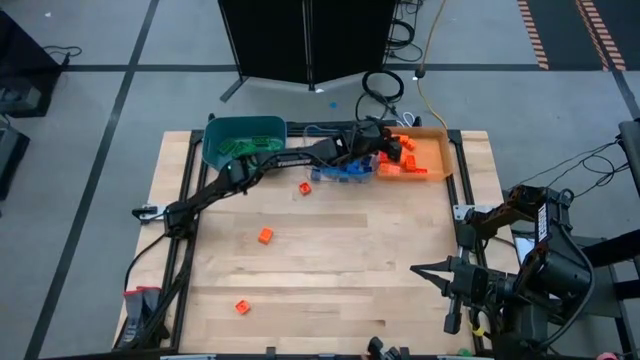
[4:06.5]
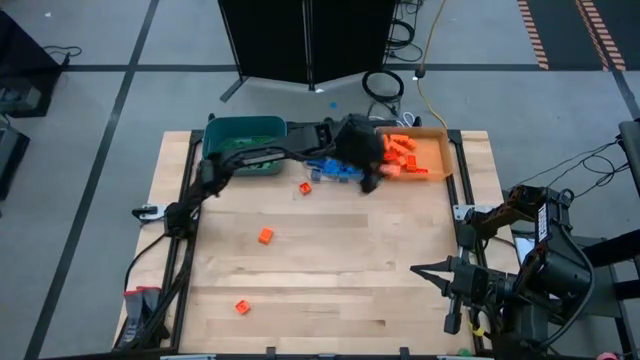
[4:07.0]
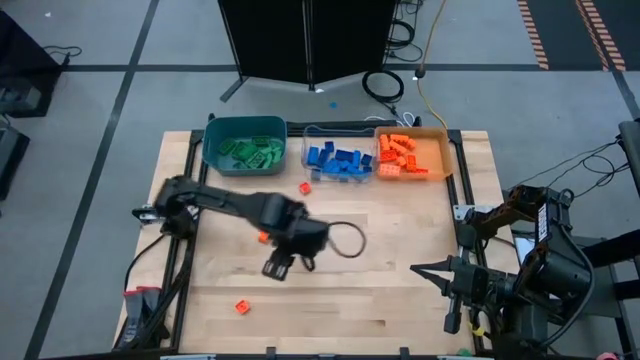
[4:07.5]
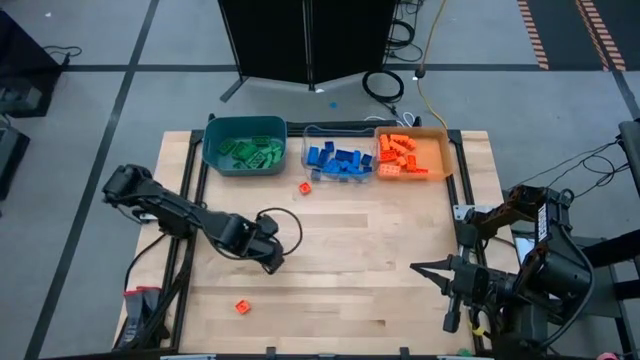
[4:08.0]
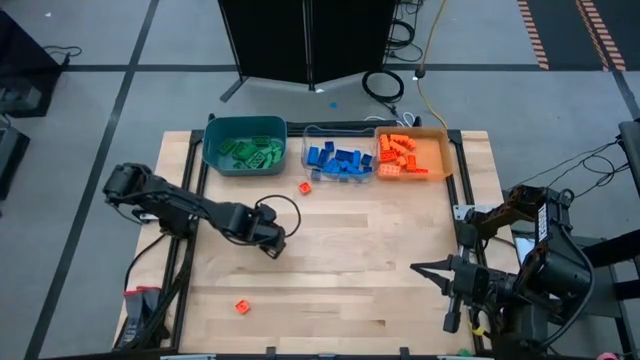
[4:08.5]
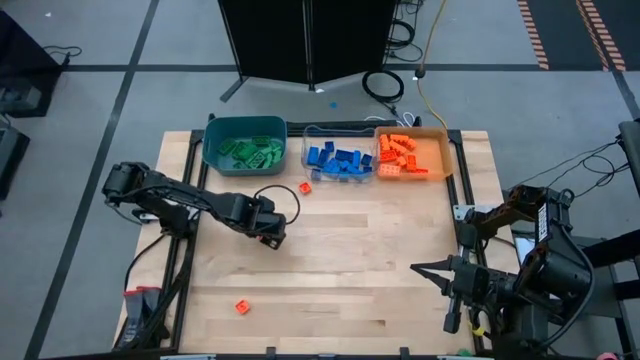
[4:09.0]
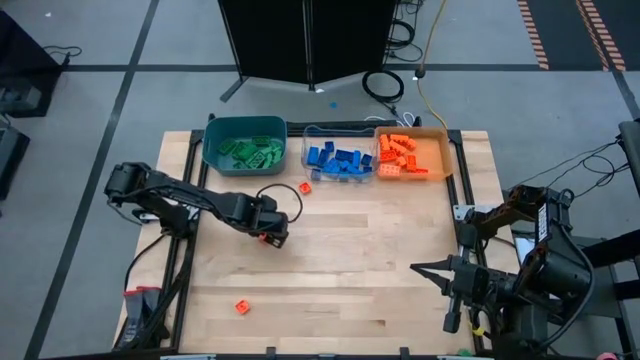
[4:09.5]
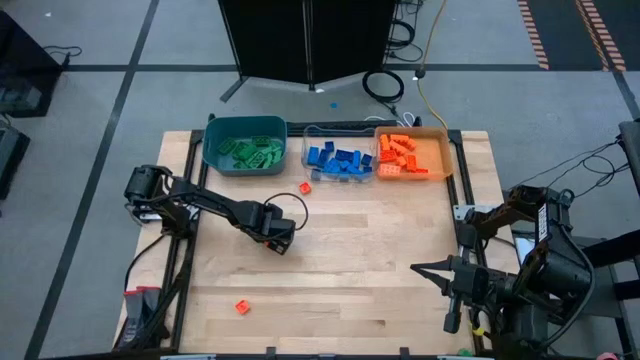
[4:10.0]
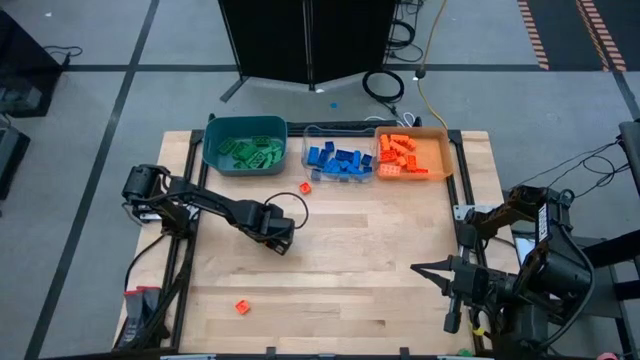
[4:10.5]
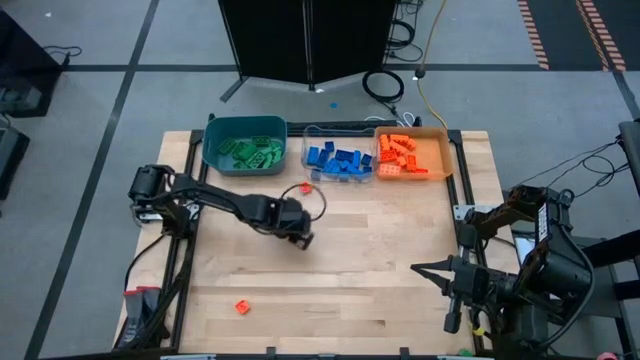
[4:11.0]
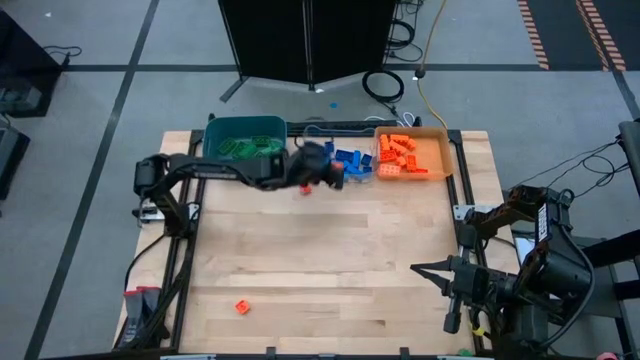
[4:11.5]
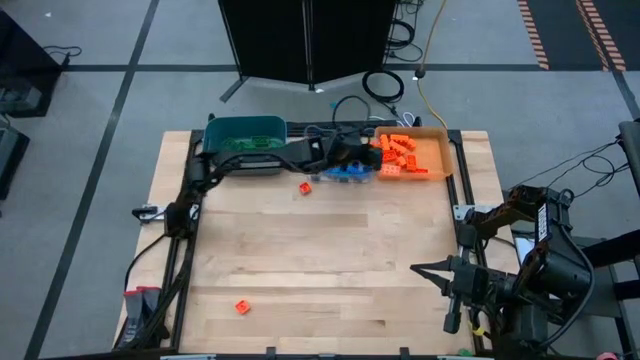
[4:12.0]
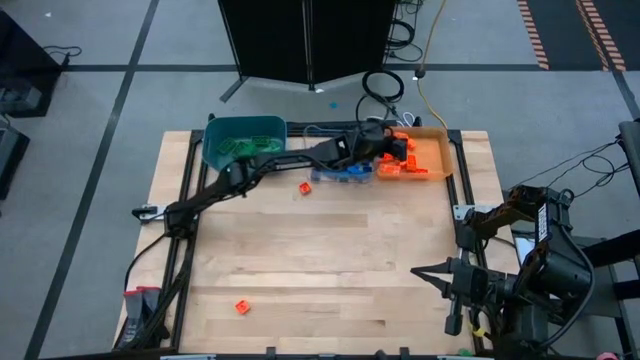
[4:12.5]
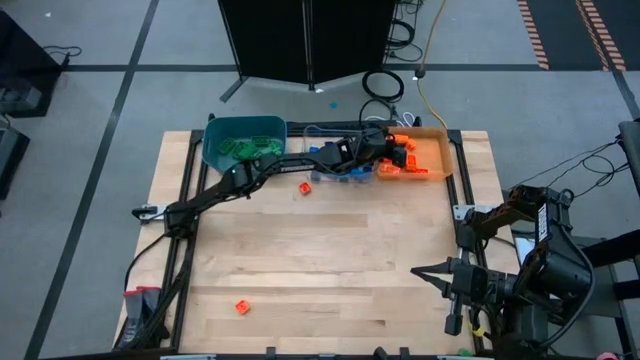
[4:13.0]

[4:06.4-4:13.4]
Task: Sort blocks
Put the orange game piece into the orange transparent bin

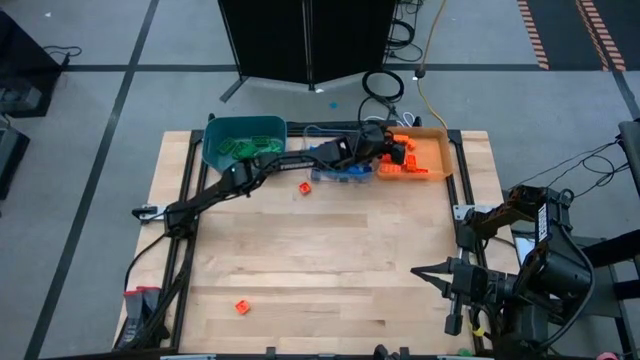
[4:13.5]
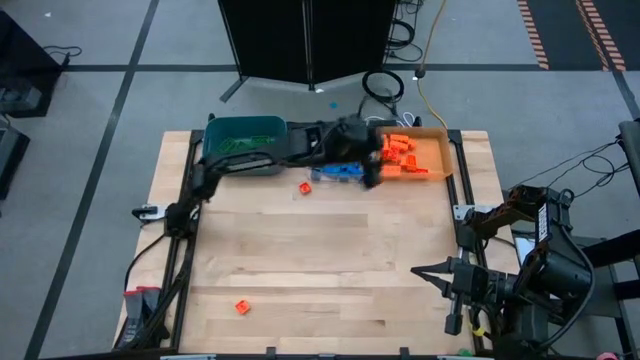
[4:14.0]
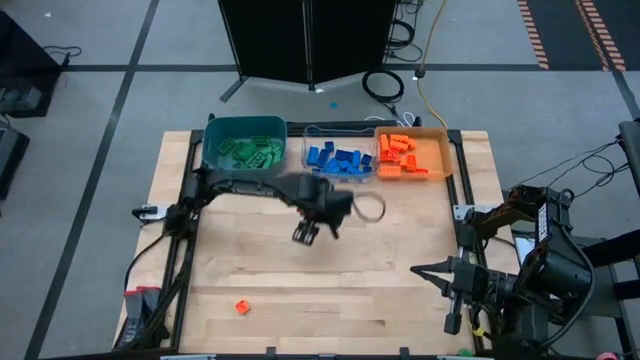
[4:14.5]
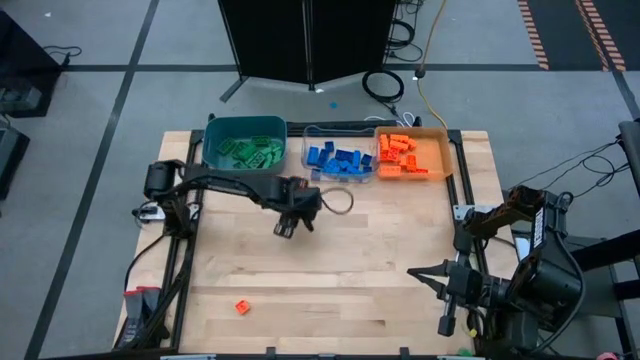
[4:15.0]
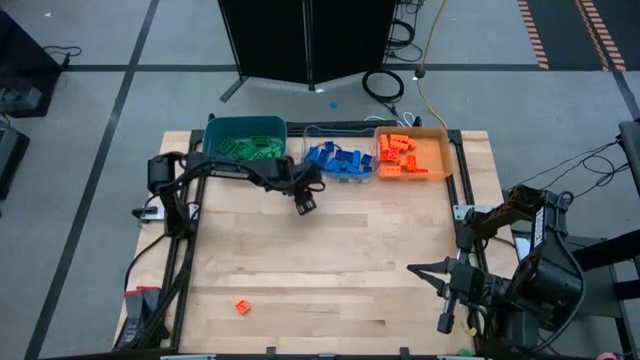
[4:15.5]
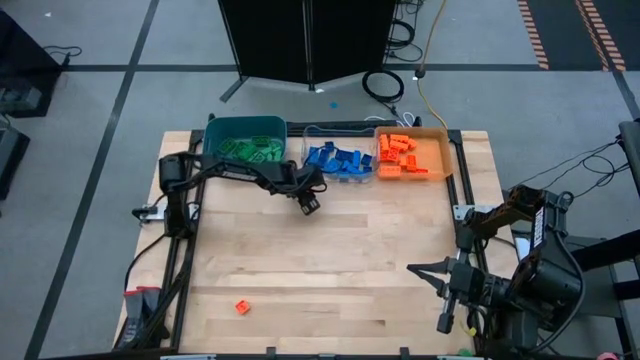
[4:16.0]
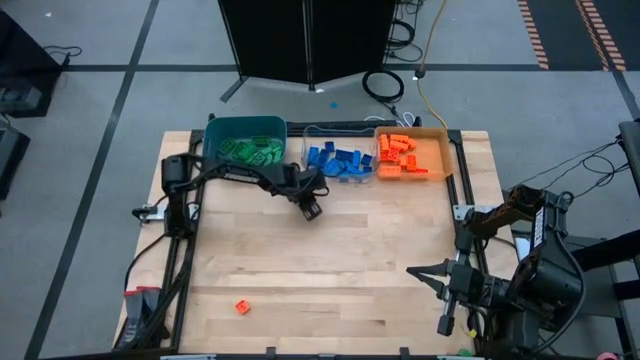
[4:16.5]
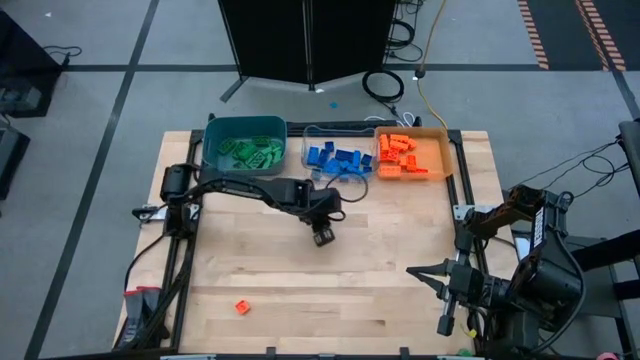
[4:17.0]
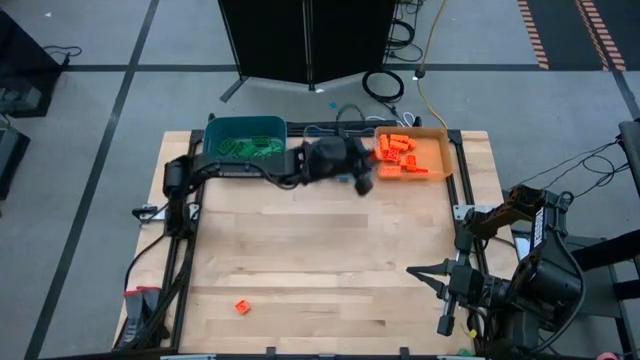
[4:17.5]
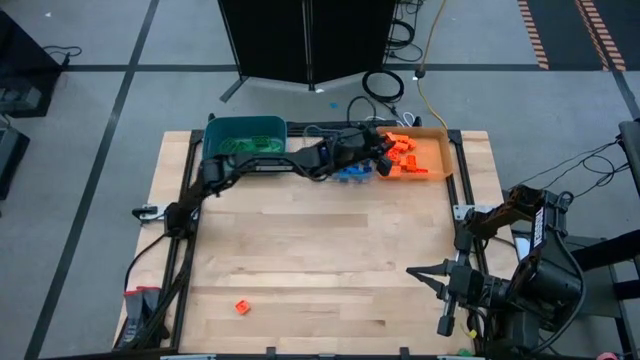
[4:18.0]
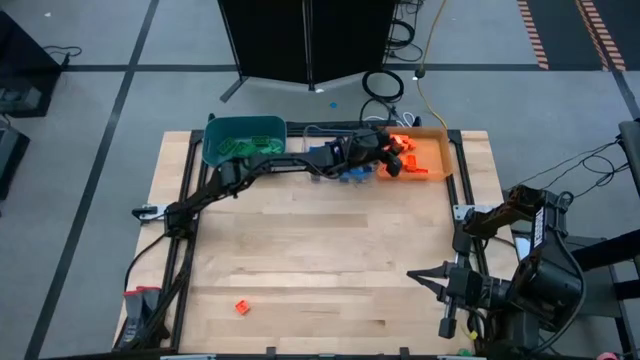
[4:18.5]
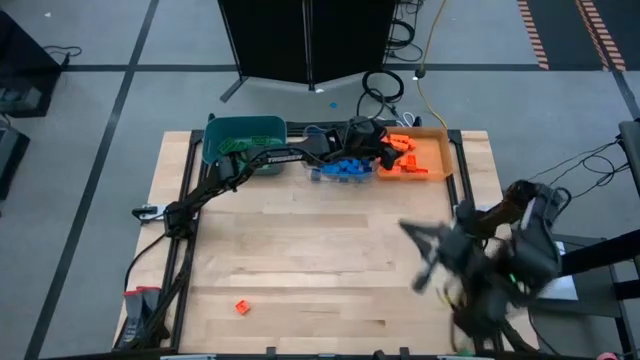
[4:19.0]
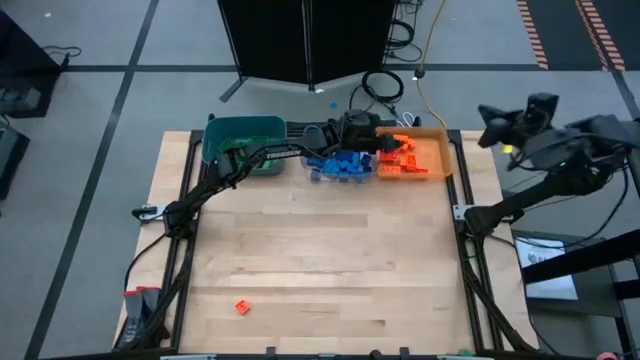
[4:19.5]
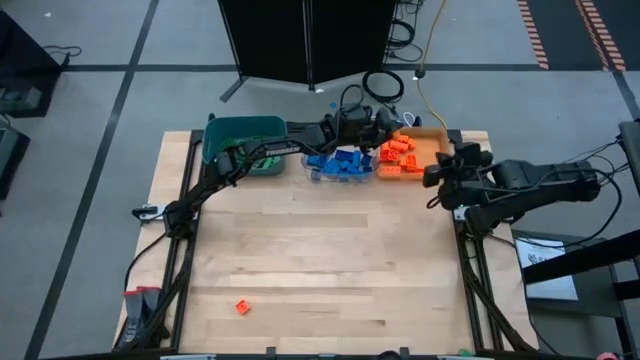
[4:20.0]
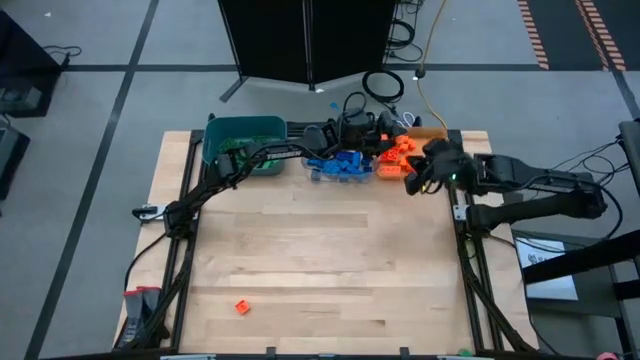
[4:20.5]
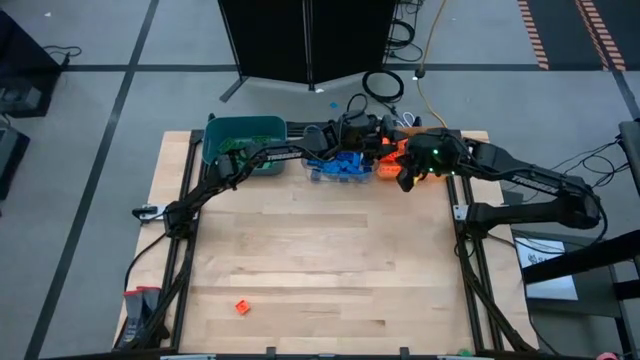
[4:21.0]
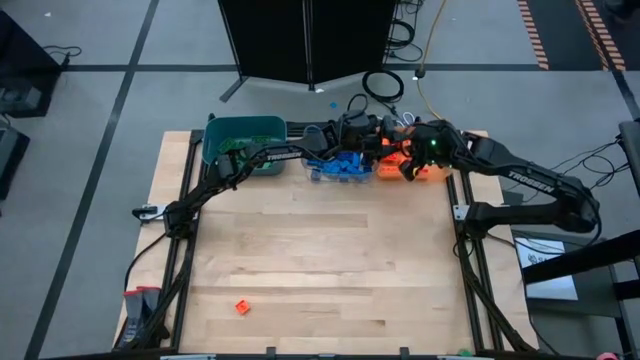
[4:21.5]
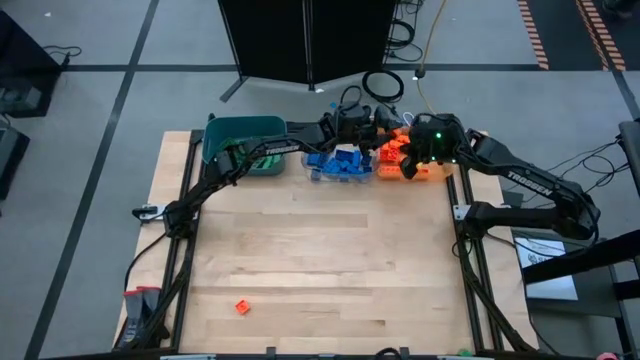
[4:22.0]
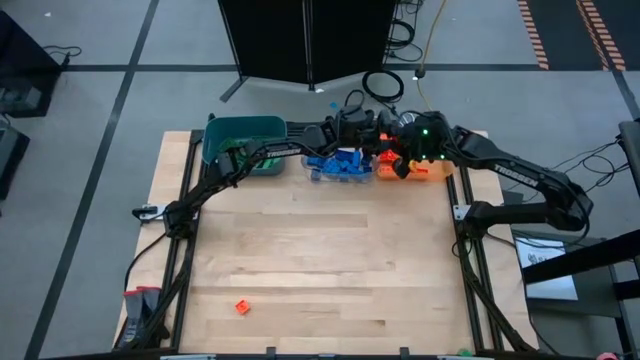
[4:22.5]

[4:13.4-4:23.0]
Put the orange game piece into the orange transparent bin
